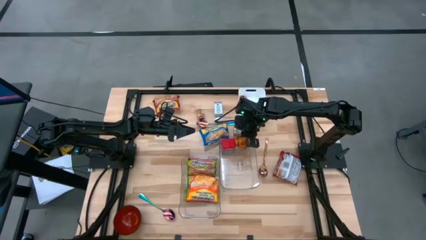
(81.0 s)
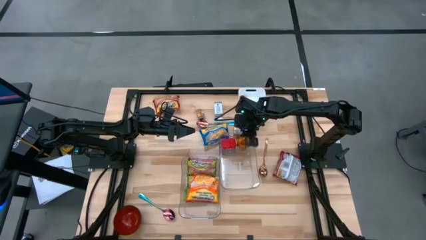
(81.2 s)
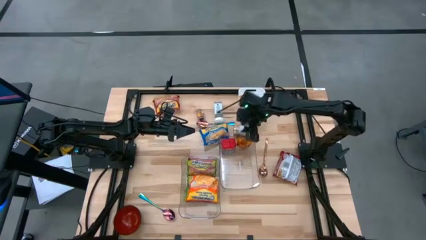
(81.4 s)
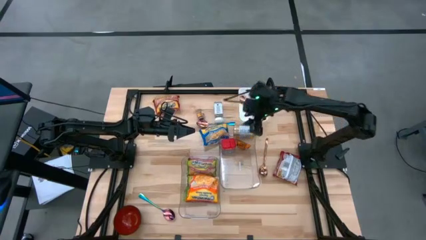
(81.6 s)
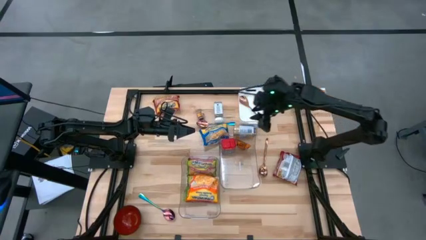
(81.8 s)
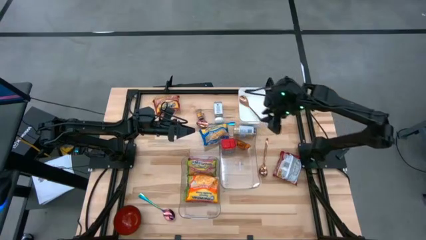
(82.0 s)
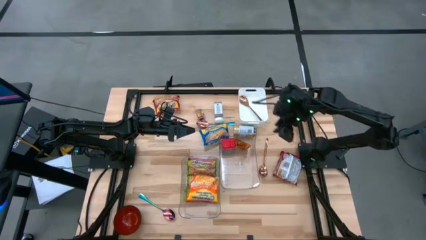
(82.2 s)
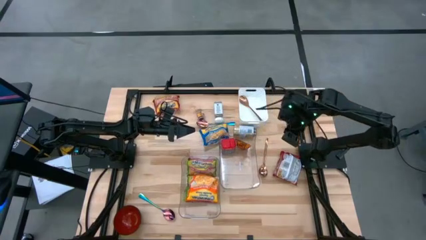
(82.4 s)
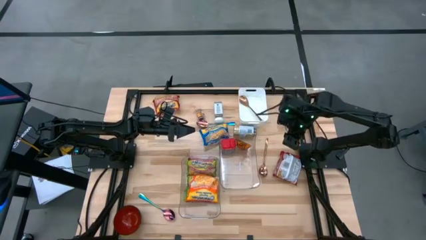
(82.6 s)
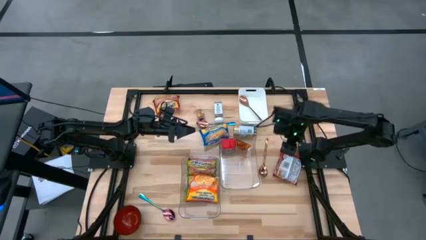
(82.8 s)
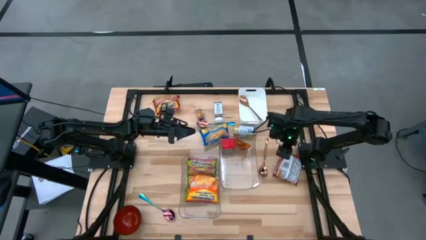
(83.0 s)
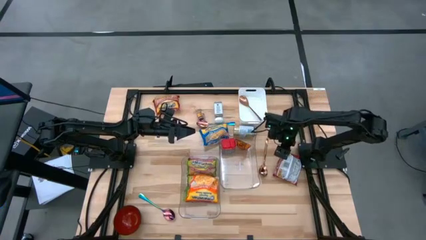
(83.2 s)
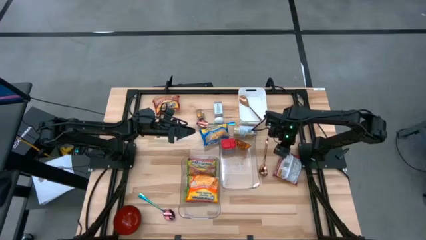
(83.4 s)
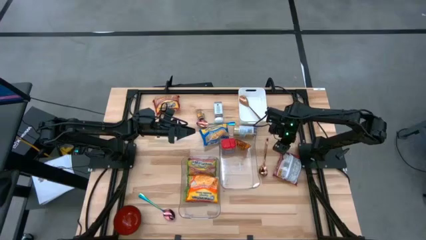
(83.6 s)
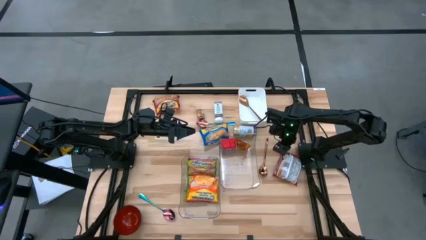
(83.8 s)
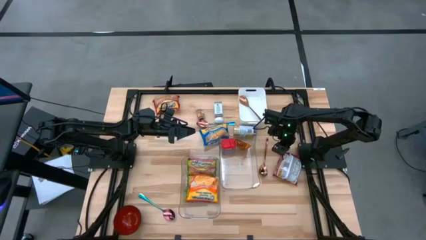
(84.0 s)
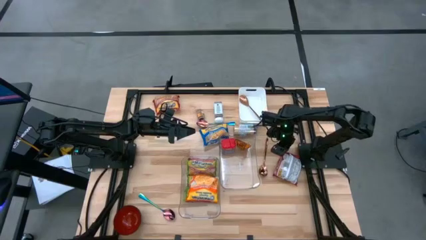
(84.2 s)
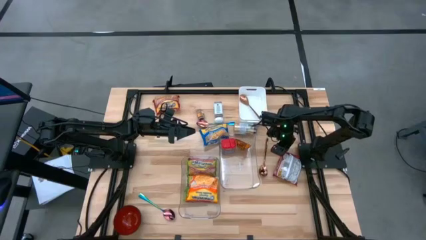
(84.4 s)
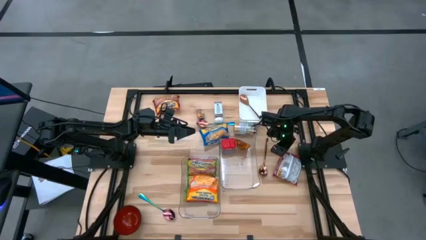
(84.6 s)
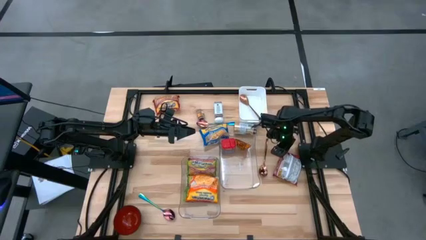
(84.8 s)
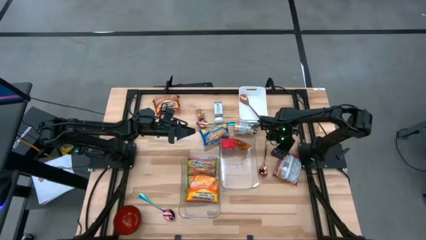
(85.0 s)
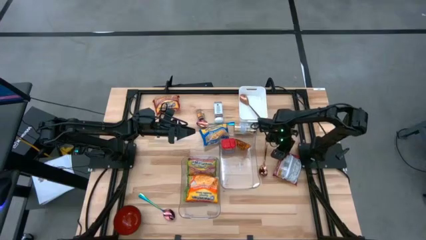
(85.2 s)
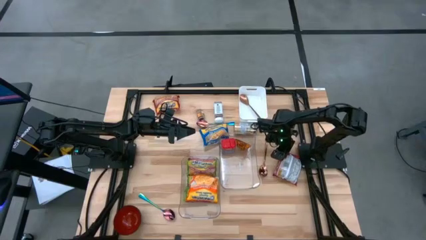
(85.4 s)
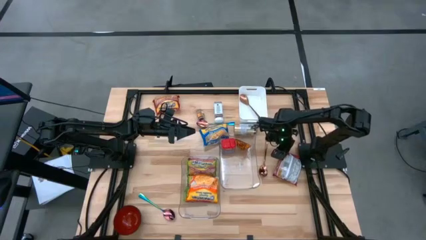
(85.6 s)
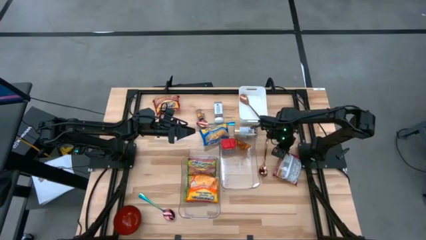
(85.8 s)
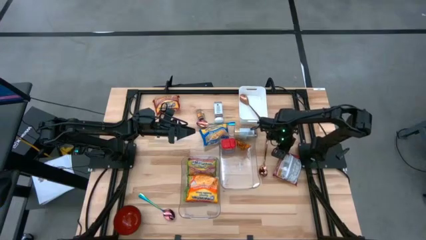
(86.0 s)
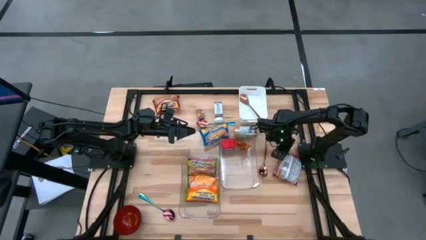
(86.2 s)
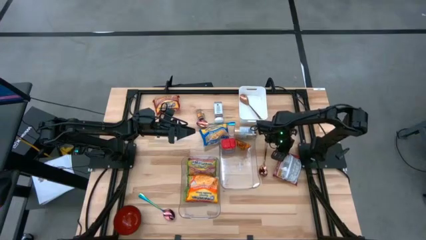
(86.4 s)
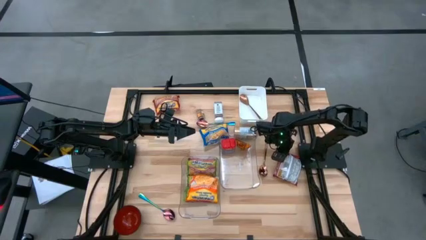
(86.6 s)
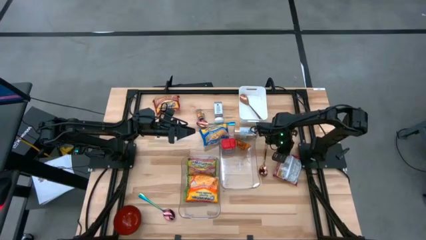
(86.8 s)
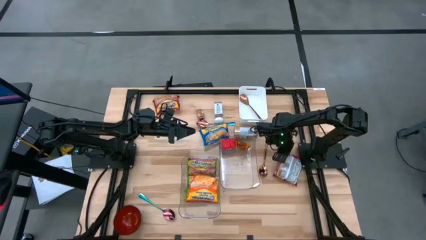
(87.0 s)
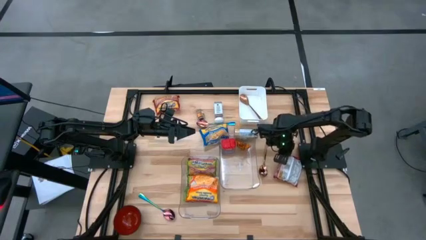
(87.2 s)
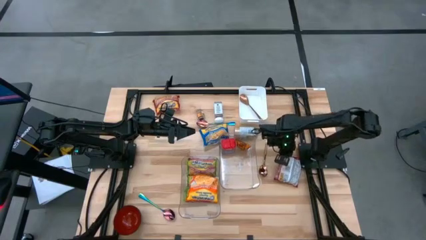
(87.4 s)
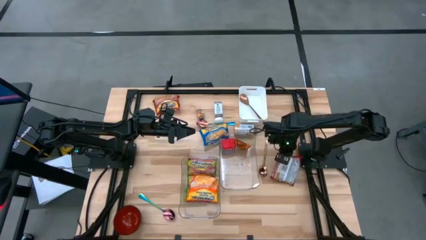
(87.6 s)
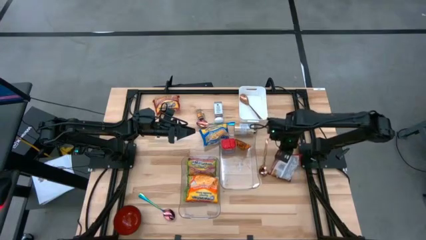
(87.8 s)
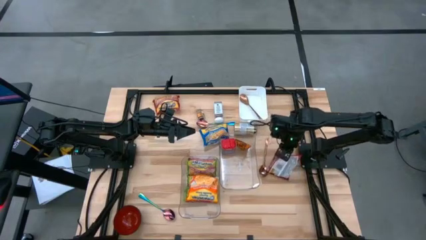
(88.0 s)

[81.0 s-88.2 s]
Task: Pick & Place Food Item
Put the bottom red noodle pack into the left transparent bin

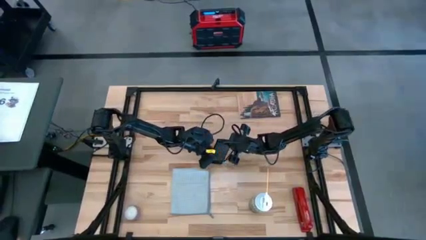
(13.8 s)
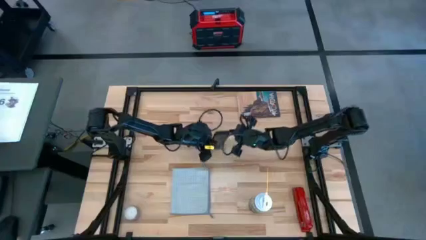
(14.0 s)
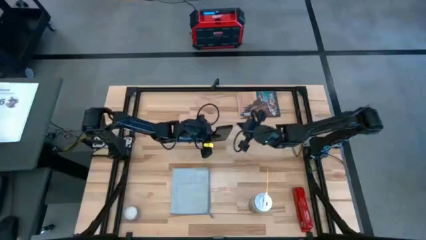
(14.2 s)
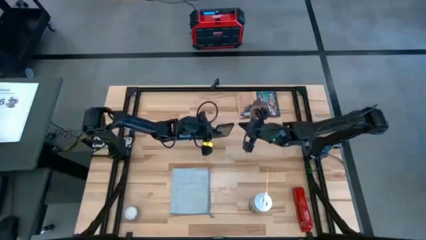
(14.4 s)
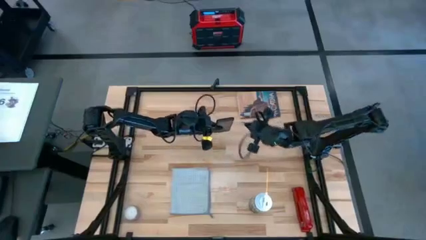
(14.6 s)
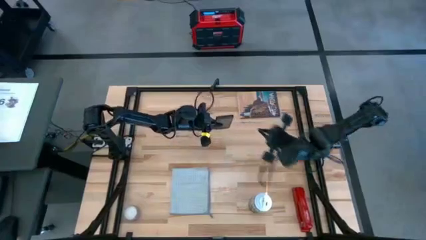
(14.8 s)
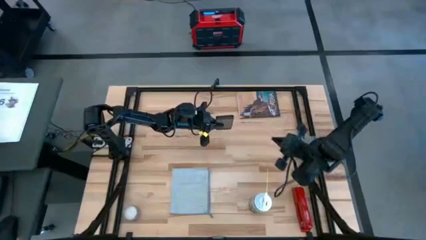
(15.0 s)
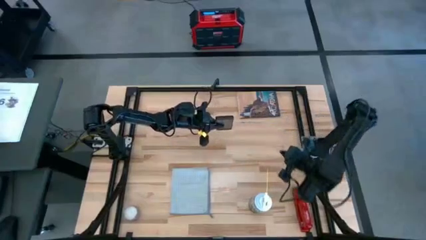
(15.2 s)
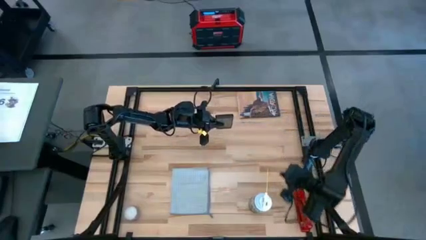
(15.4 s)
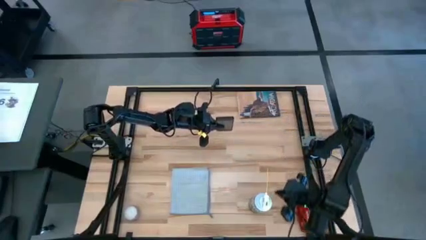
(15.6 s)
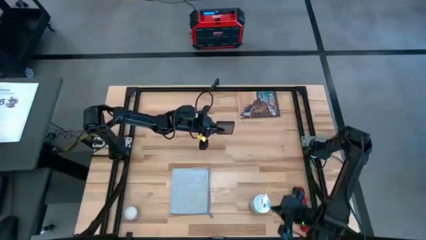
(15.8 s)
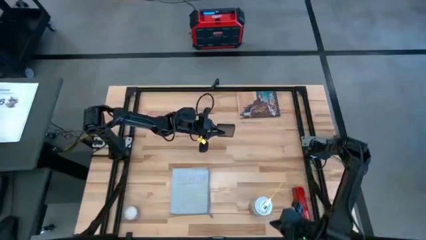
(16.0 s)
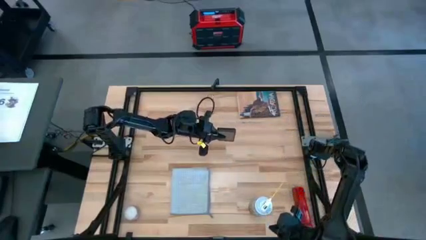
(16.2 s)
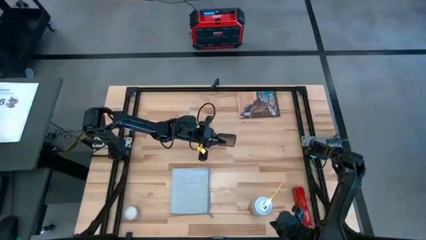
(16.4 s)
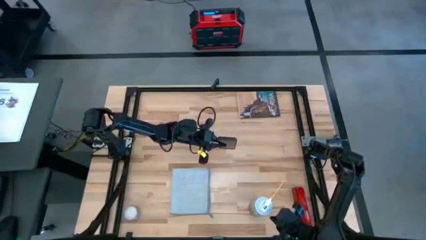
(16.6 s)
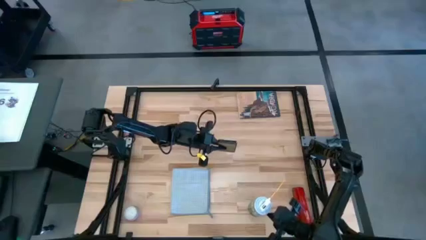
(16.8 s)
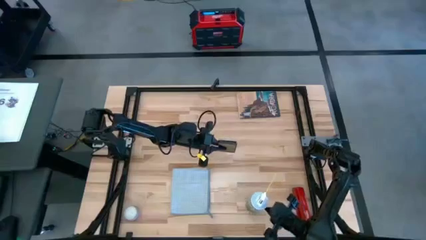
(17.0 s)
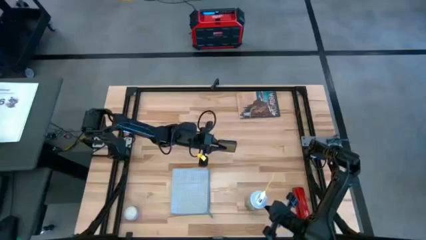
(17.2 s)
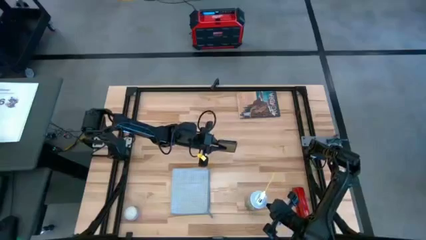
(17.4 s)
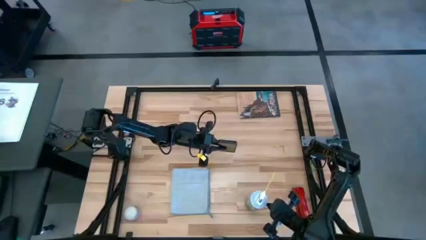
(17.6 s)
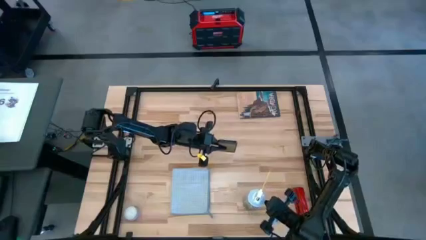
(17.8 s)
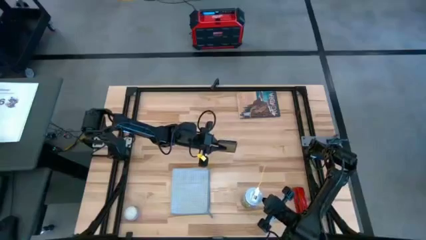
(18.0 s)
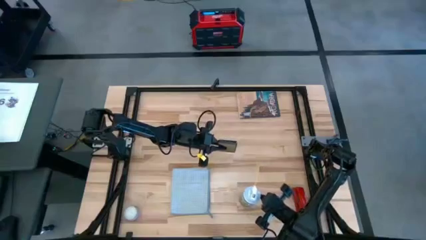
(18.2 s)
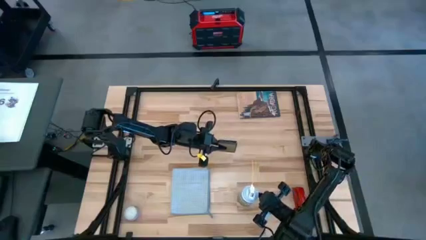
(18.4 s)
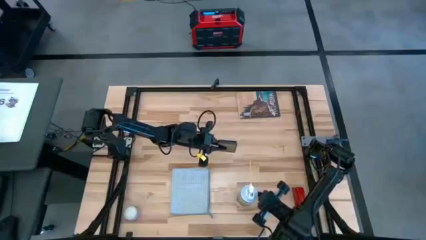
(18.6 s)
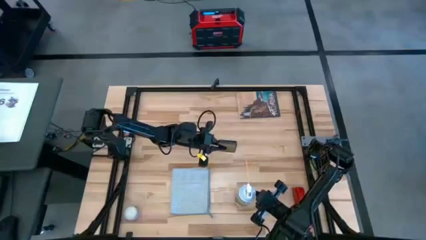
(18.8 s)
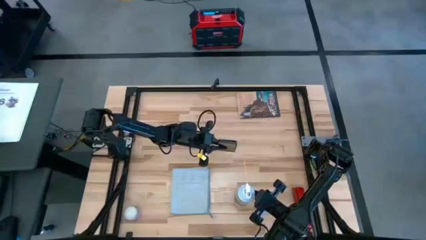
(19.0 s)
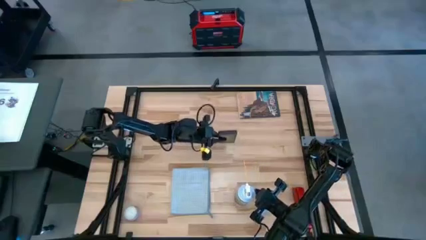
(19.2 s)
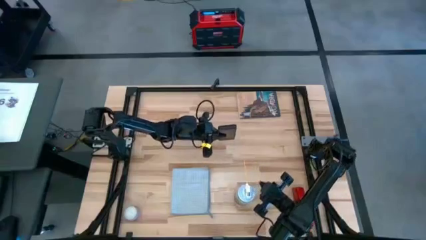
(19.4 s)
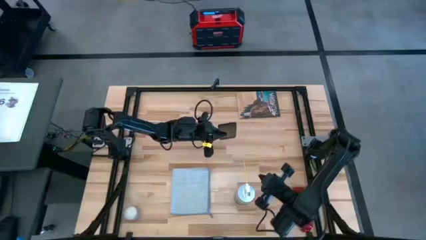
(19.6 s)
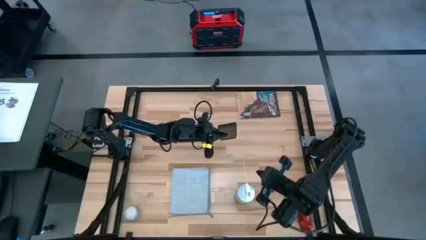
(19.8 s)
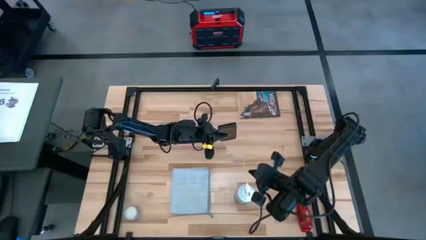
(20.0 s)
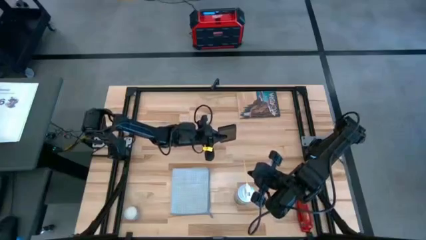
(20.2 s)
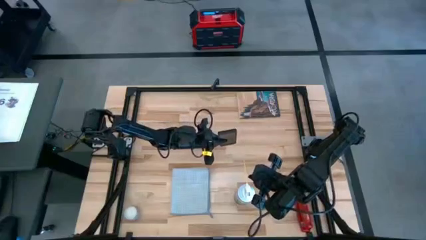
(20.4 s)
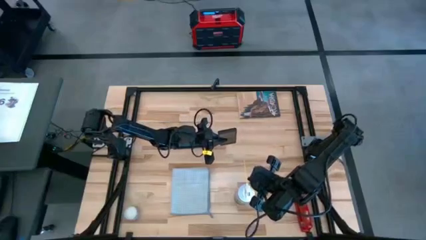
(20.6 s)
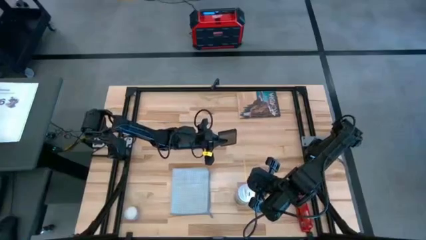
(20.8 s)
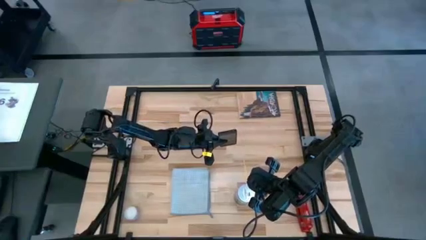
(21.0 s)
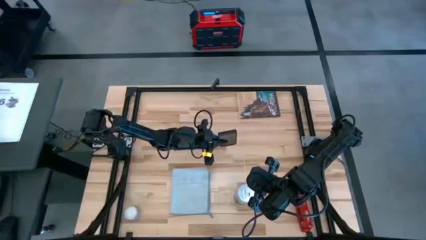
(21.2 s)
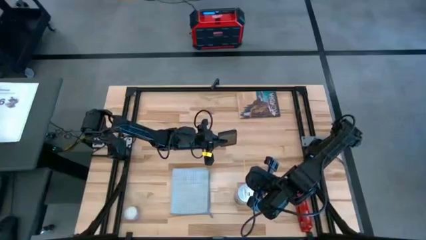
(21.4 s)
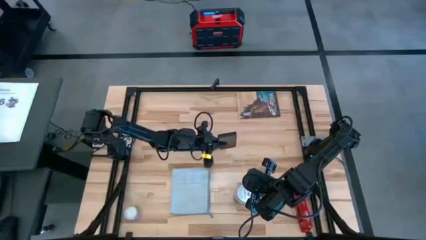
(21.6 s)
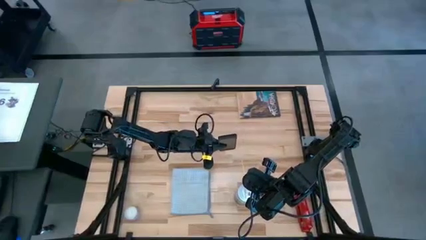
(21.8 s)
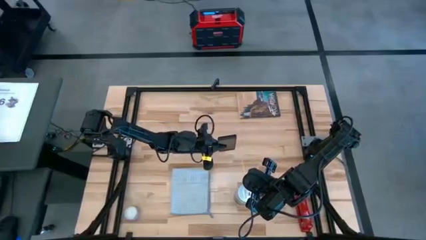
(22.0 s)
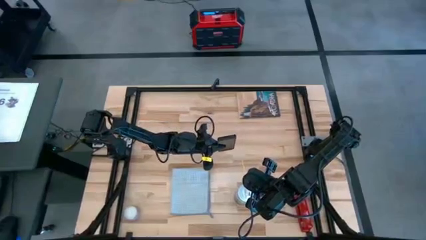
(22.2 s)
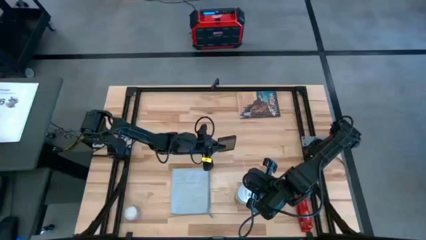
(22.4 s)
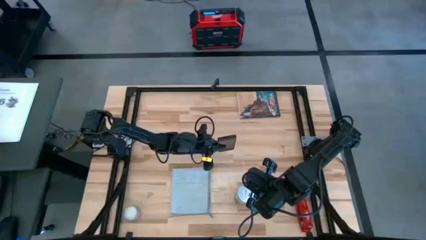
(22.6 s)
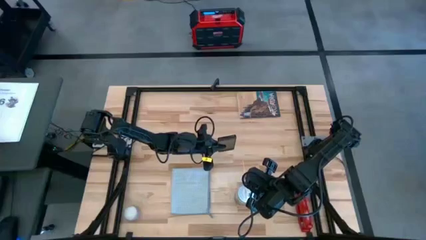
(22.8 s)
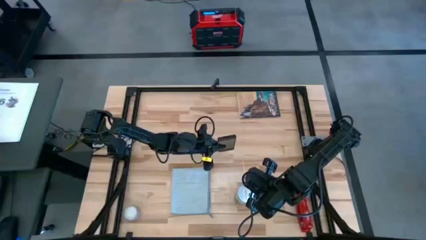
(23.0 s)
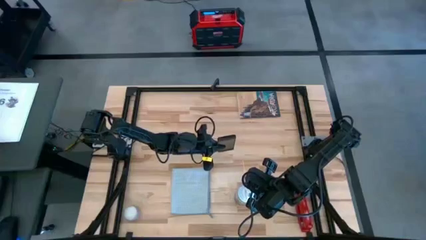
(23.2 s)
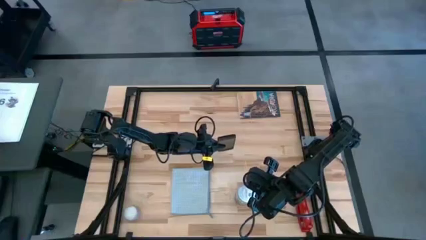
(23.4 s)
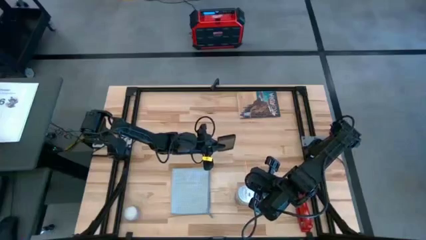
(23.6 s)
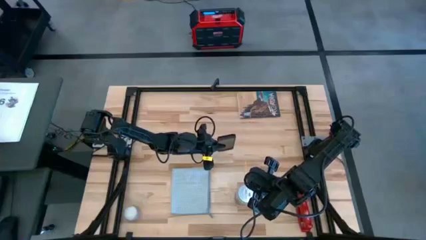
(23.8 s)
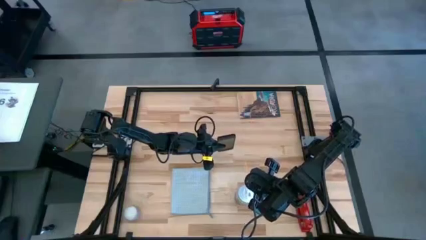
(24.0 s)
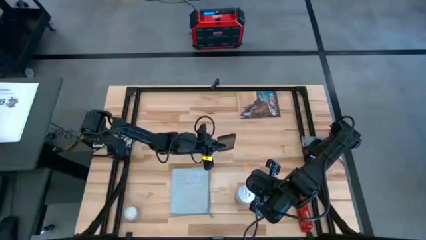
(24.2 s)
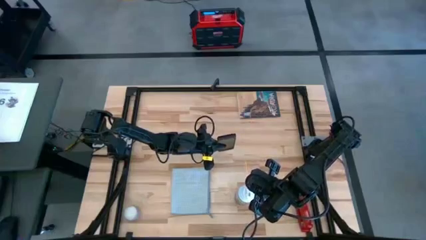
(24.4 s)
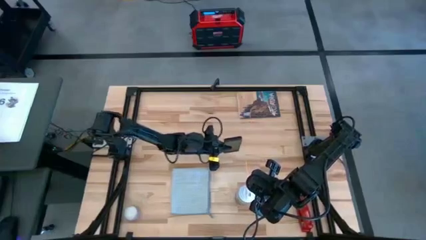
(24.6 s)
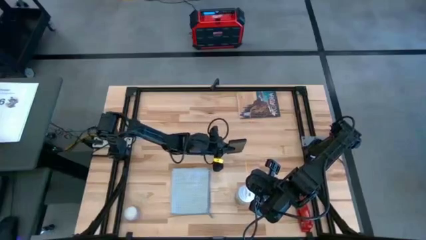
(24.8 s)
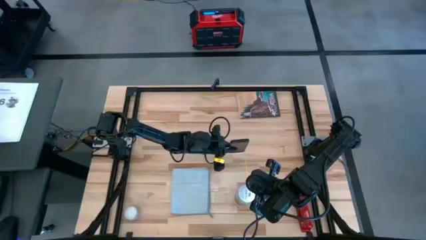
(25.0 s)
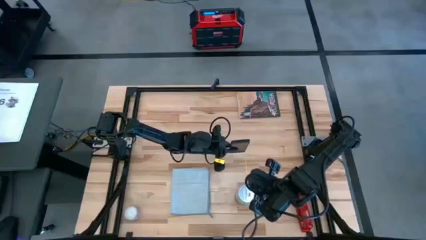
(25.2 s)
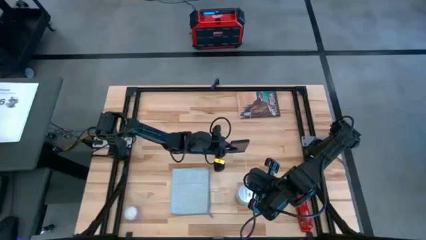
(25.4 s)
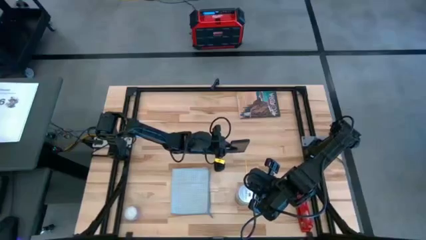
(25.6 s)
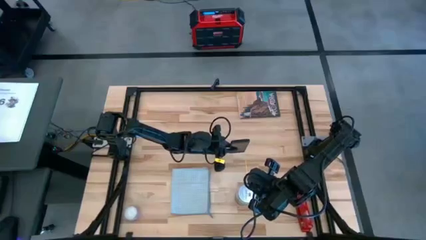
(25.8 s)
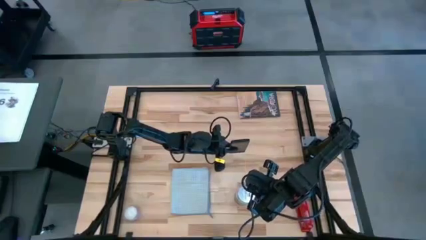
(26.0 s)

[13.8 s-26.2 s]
Task: Apply microfiber cloth
Spray the front of the black cellphone using the white spray bottle
